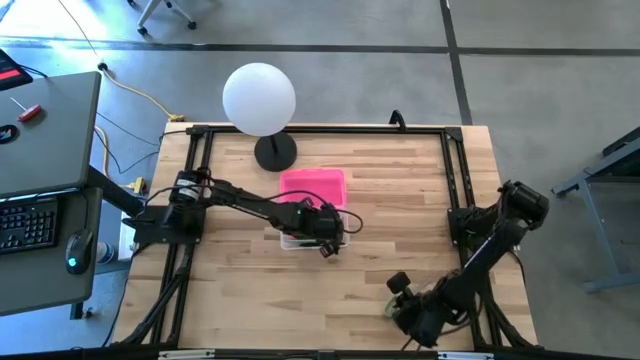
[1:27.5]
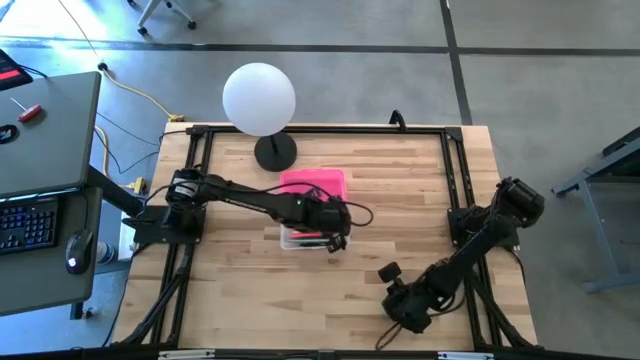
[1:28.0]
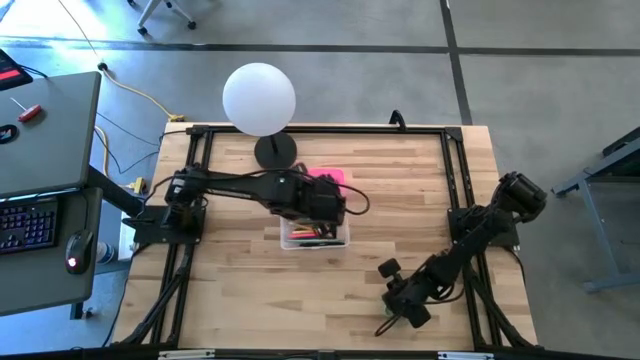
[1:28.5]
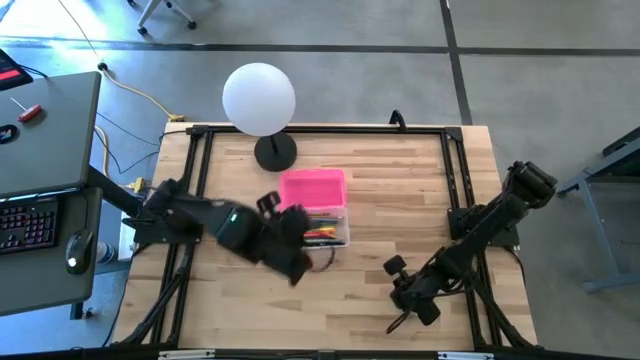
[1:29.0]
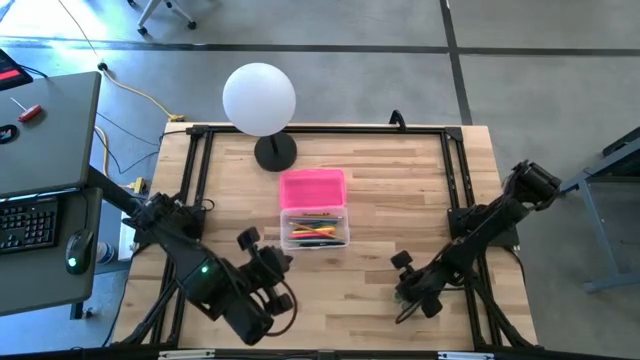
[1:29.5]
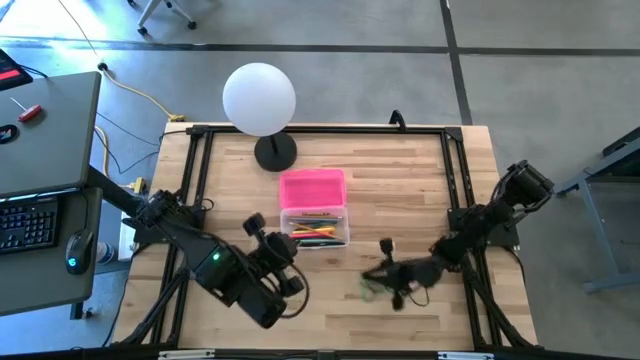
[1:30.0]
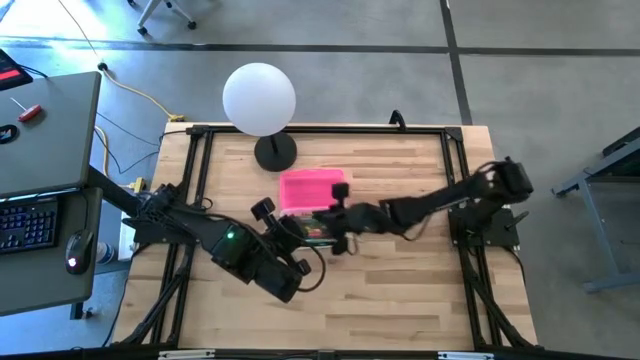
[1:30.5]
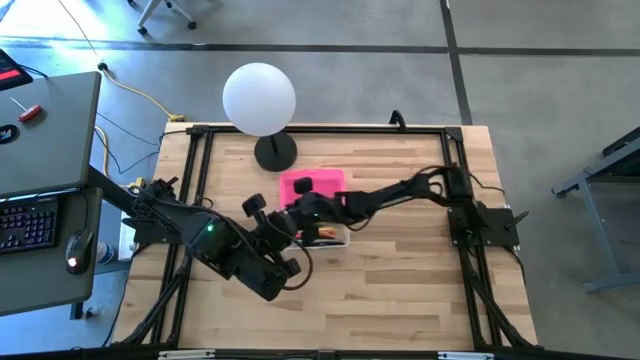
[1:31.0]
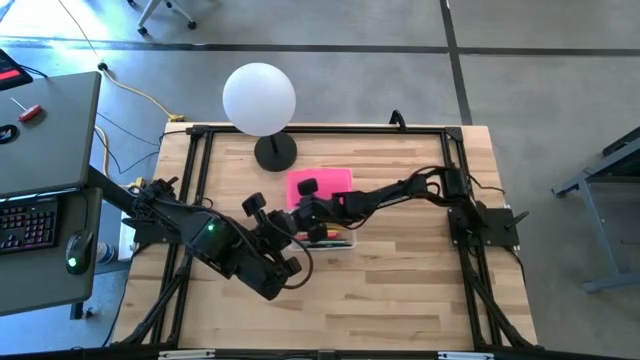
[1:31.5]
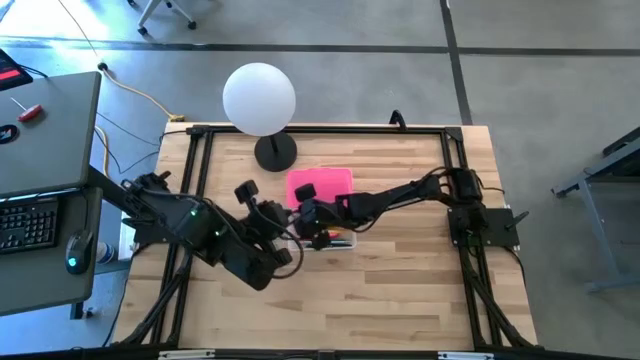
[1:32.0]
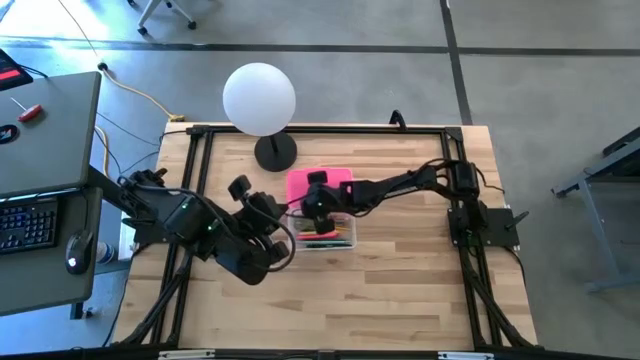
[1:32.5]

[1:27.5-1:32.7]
Task: Pick & place school supplies into a supply box
Put the green scissors into the pink supply box

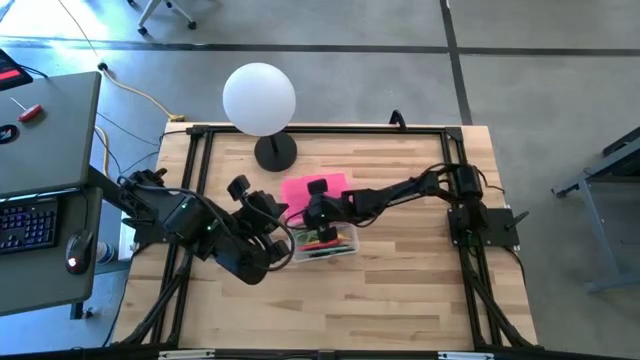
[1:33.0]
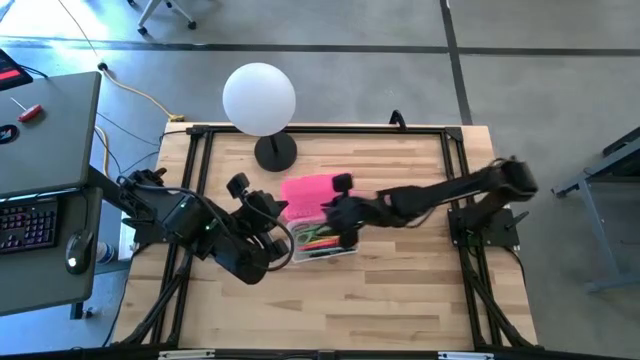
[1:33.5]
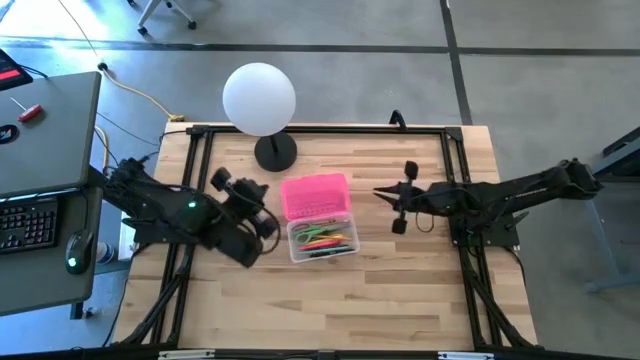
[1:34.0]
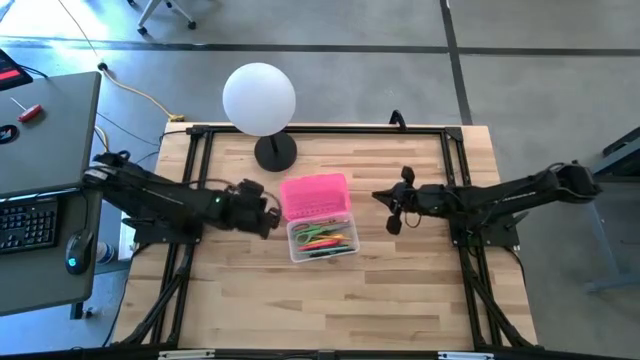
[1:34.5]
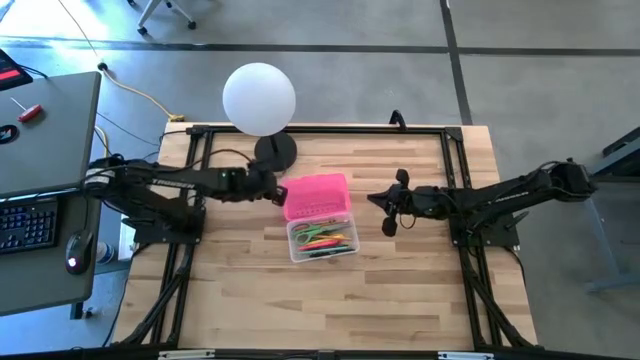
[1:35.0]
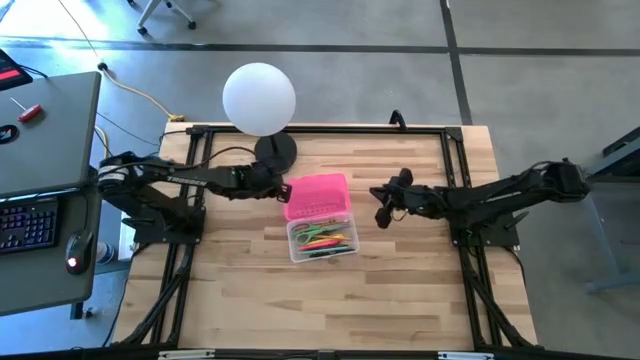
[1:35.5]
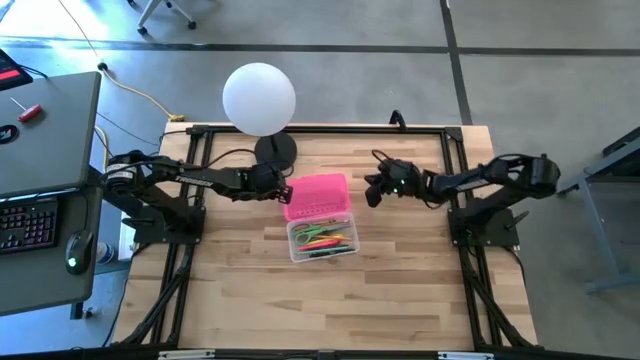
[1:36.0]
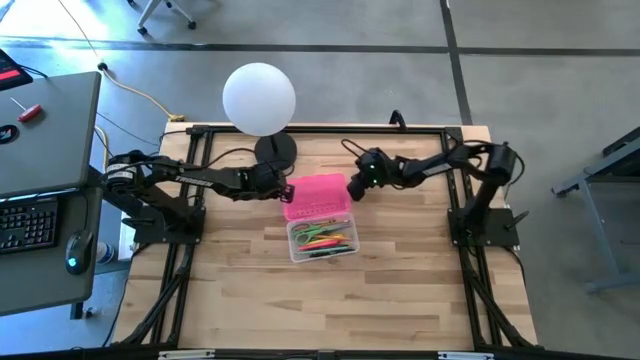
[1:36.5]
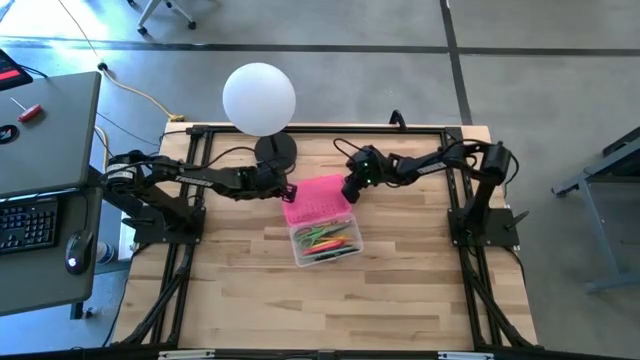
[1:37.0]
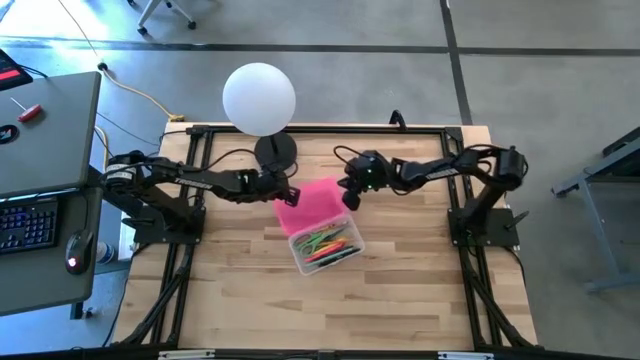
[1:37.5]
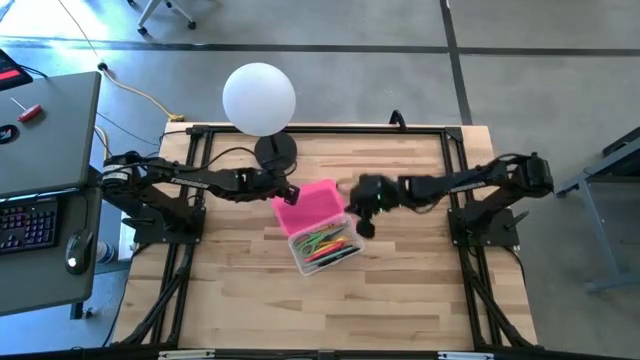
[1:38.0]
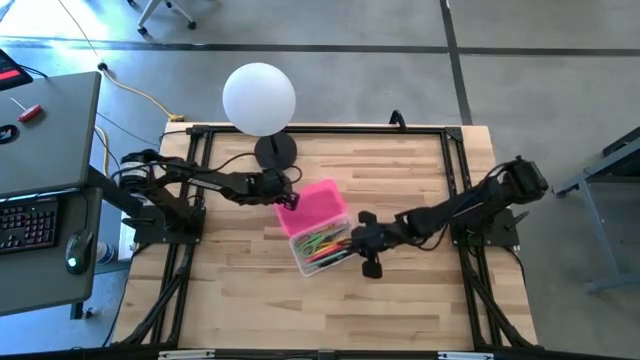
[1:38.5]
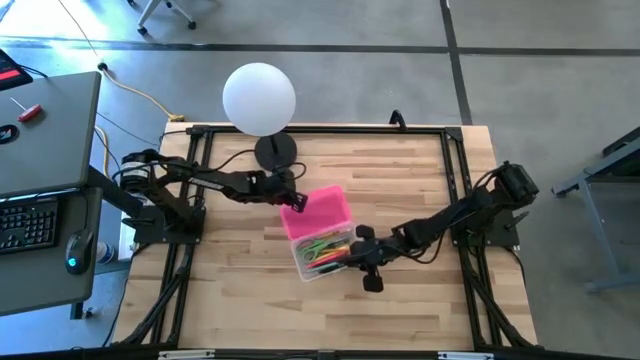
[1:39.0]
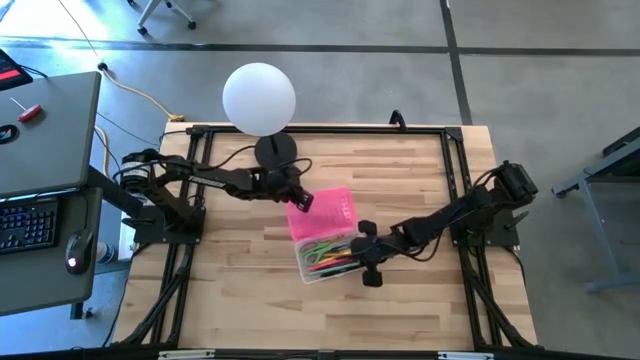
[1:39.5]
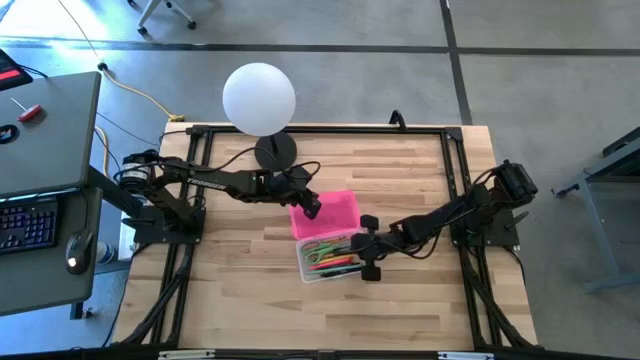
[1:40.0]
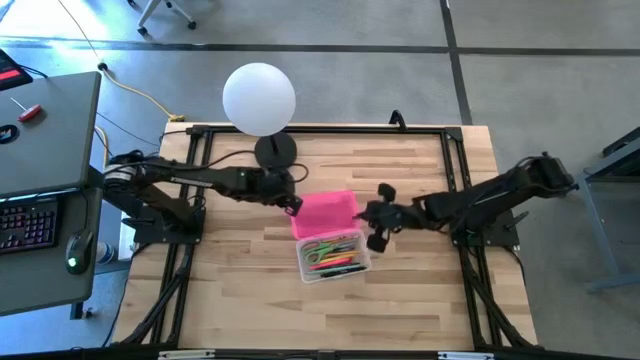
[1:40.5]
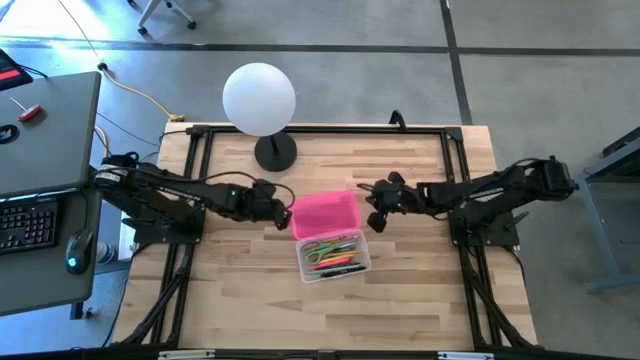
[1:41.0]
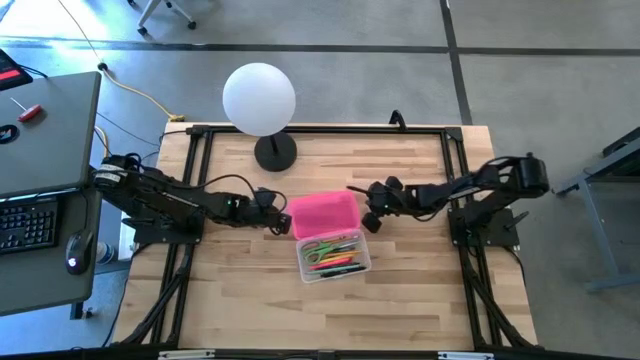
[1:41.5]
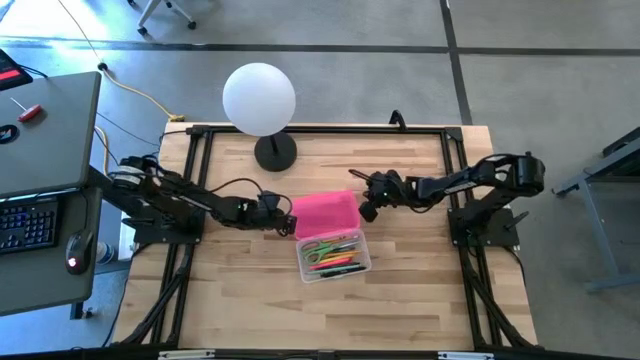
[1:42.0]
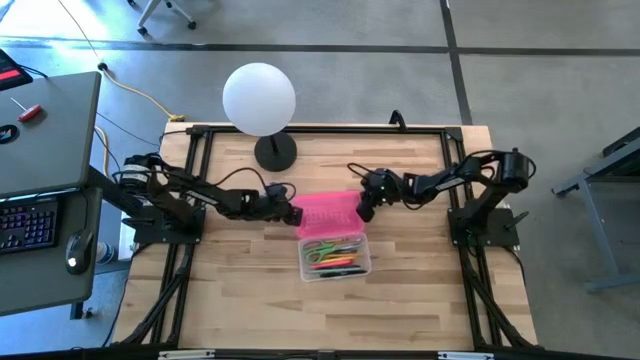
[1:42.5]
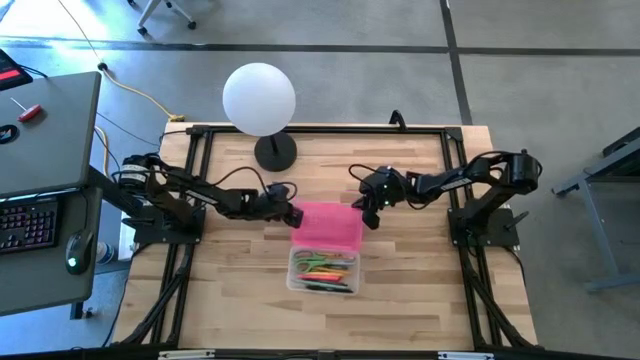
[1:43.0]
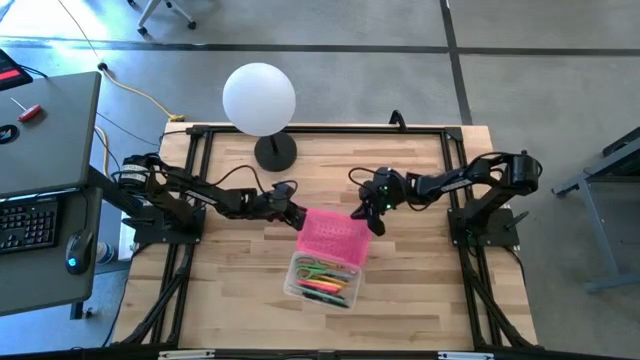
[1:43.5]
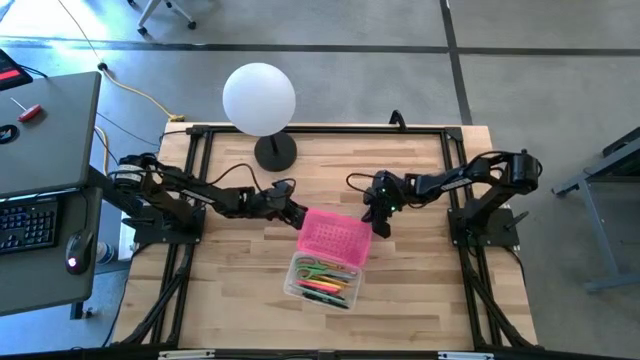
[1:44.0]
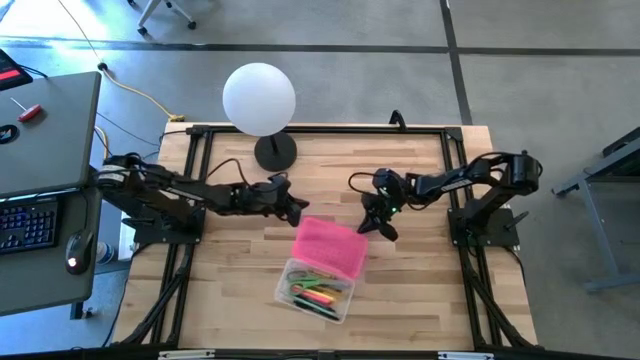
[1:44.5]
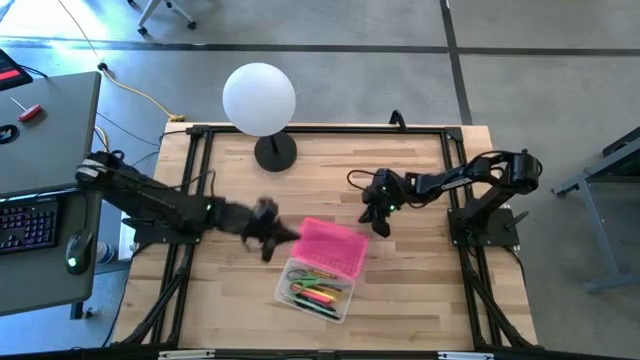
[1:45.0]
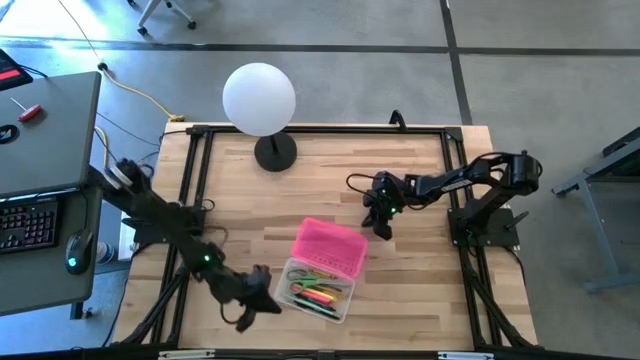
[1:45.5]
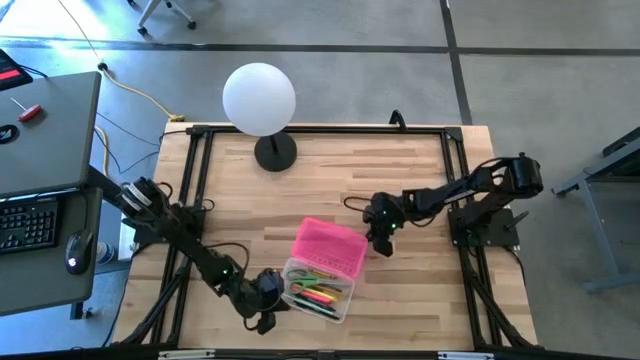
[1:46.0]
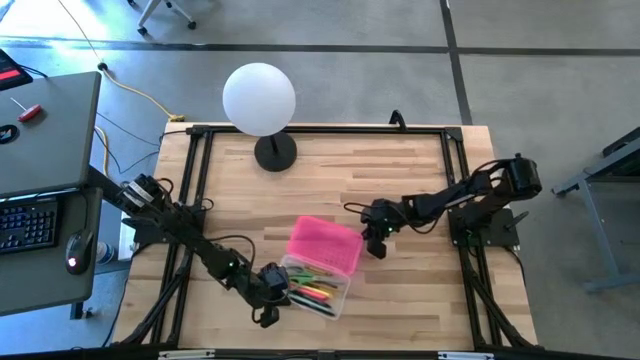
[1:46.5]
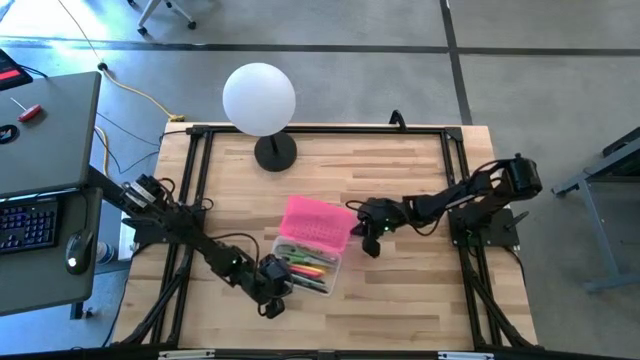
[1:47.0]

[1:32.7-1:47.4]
Close the pink supply box

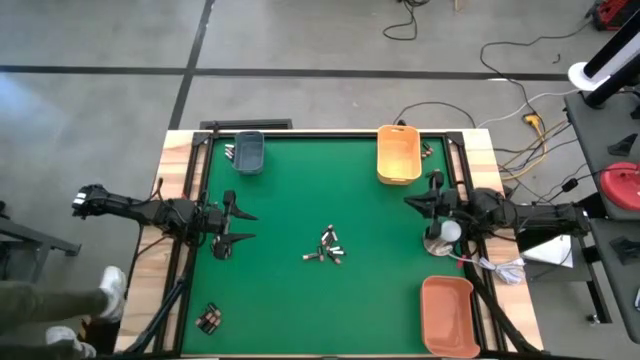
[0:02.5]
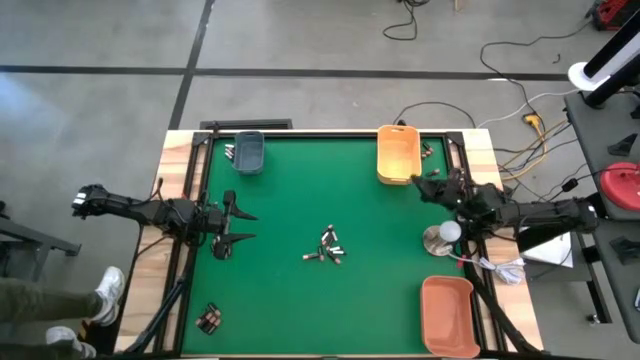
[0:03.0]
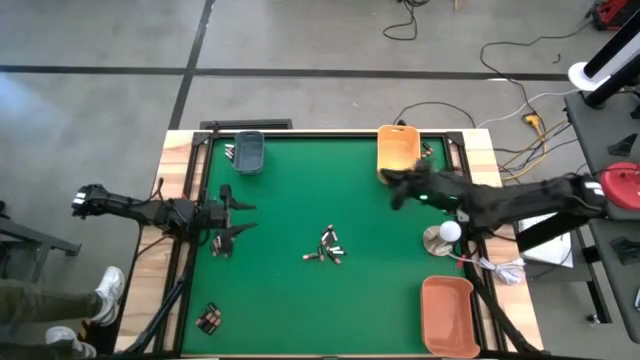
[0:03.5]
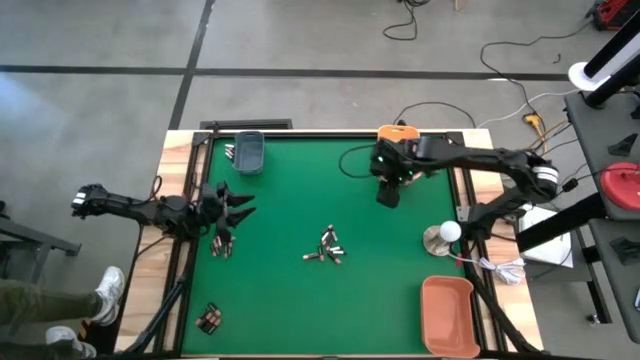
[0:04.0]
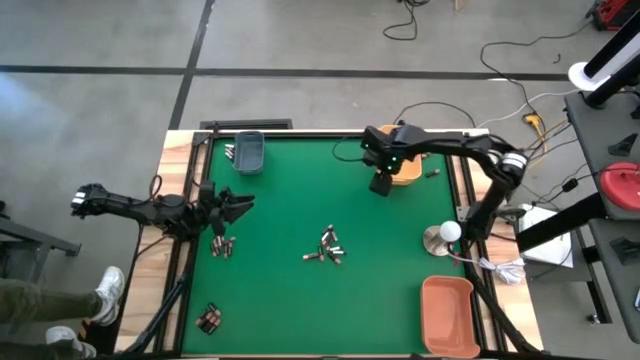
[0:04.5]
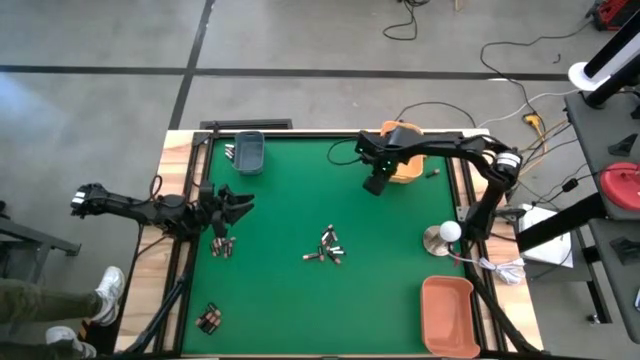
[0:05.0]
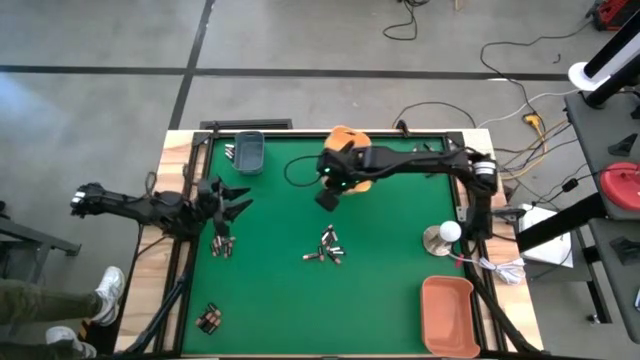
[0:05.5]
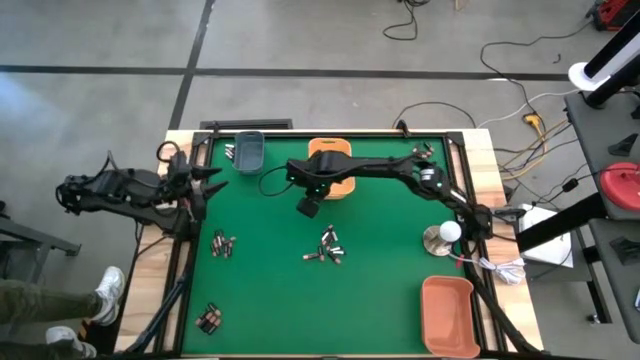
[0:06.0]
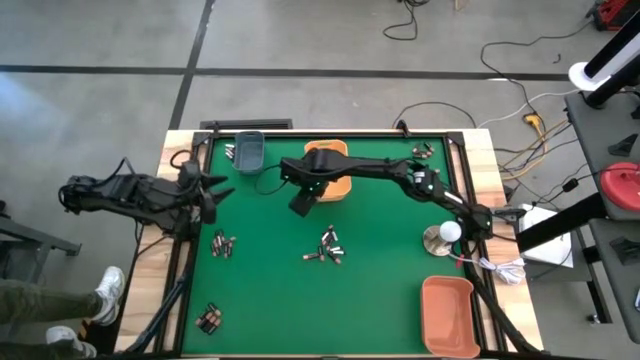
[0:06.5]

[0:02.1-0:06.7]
Task: Sort batteries
Move the yellow bin to the top center of the table
